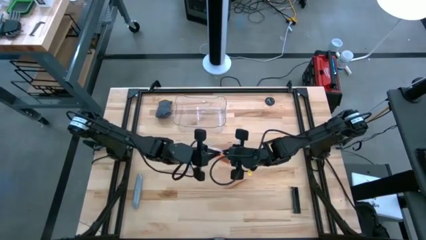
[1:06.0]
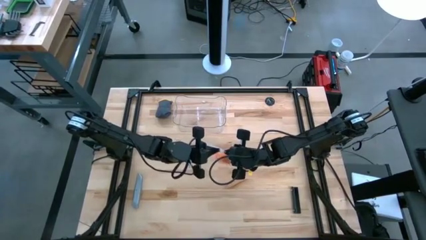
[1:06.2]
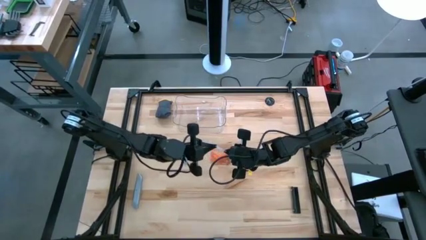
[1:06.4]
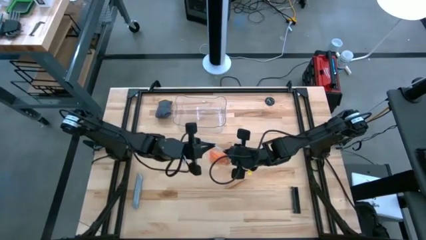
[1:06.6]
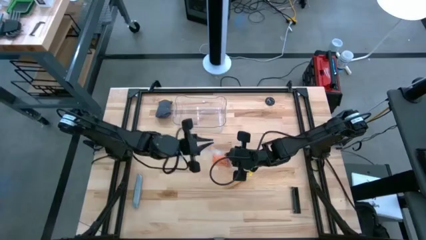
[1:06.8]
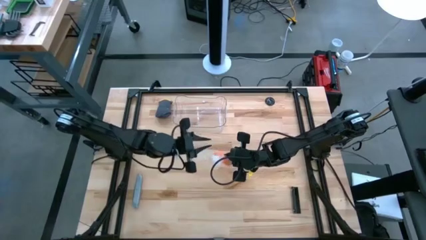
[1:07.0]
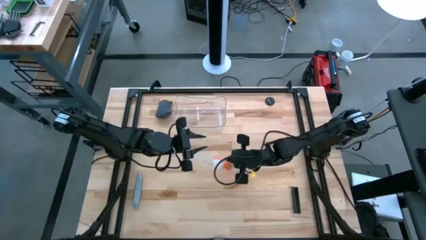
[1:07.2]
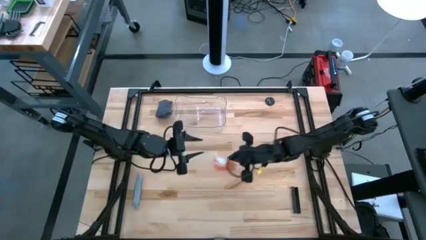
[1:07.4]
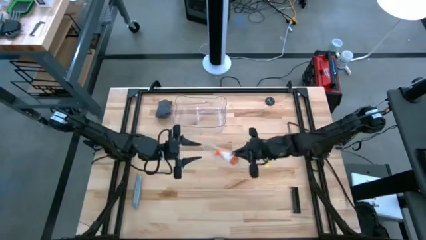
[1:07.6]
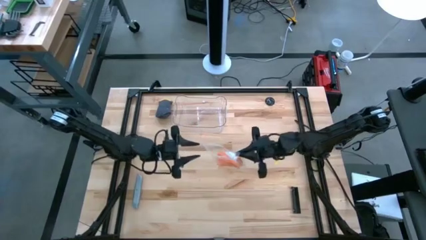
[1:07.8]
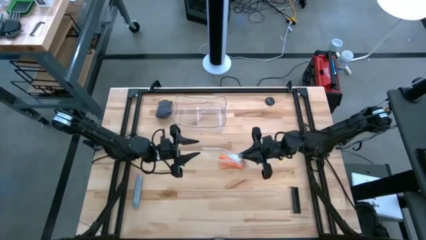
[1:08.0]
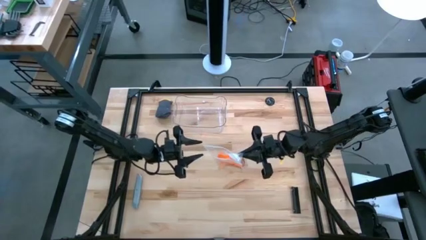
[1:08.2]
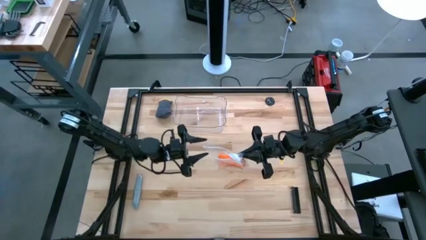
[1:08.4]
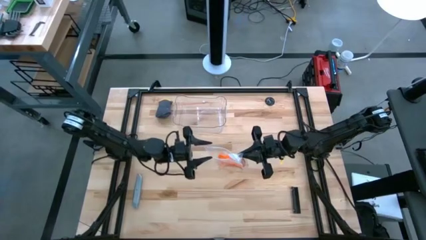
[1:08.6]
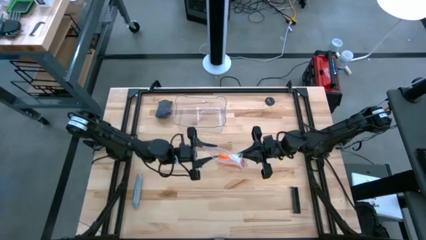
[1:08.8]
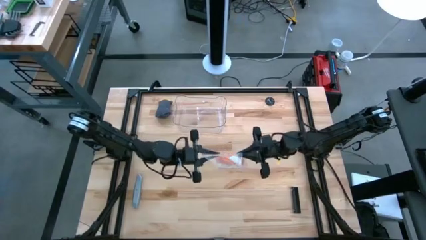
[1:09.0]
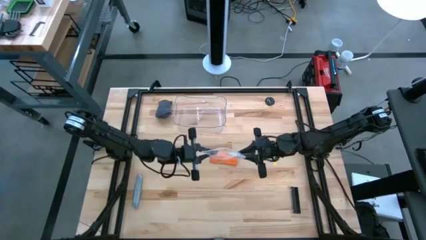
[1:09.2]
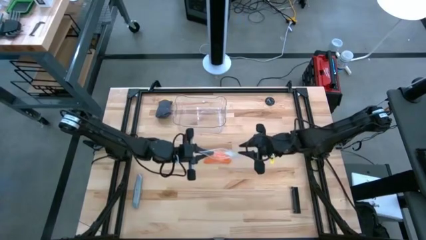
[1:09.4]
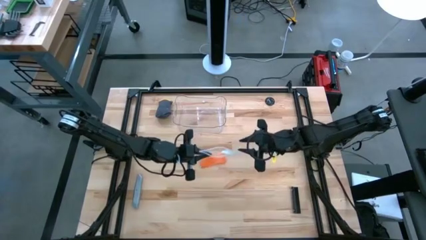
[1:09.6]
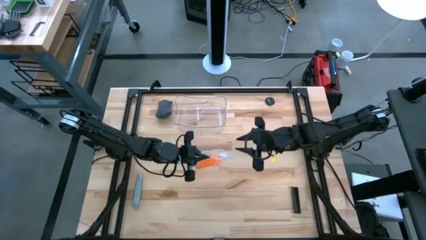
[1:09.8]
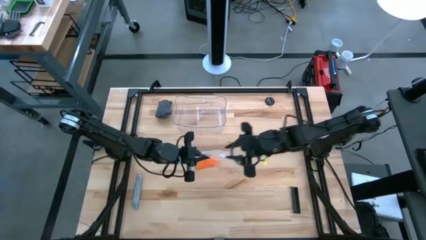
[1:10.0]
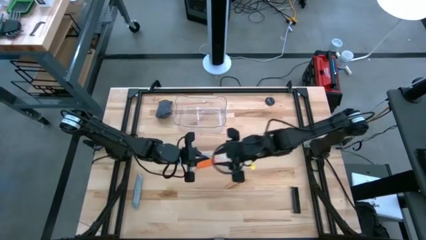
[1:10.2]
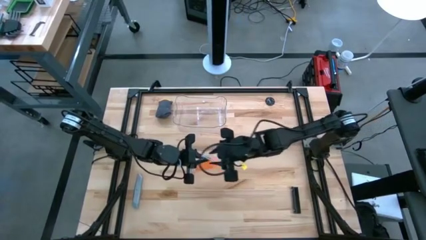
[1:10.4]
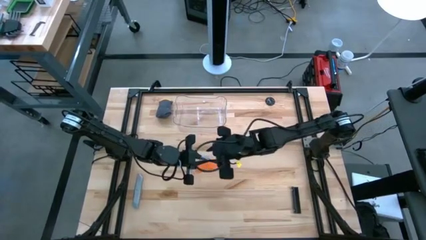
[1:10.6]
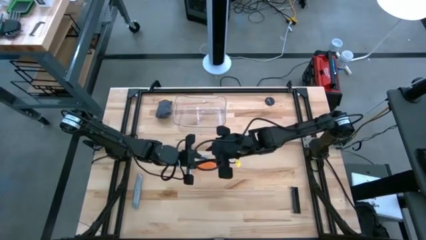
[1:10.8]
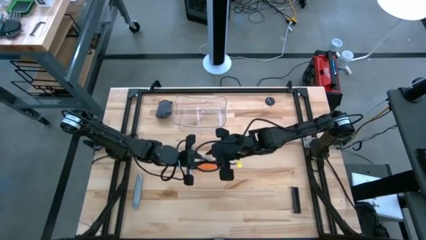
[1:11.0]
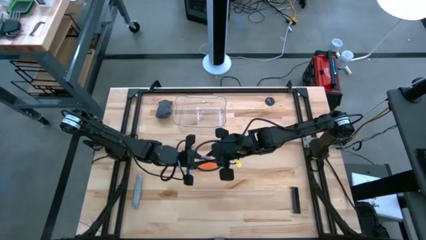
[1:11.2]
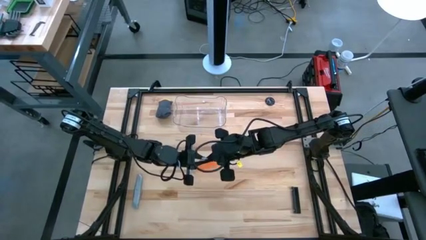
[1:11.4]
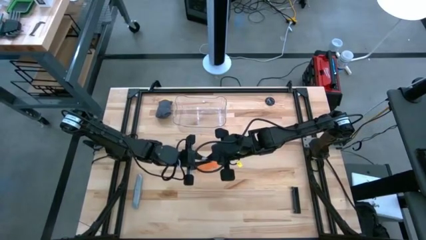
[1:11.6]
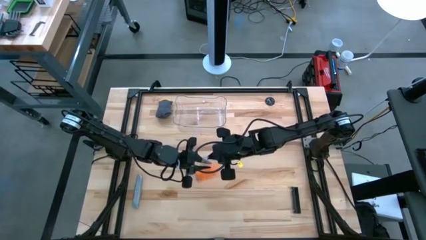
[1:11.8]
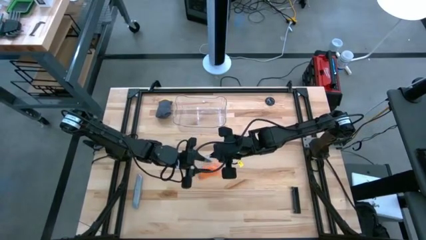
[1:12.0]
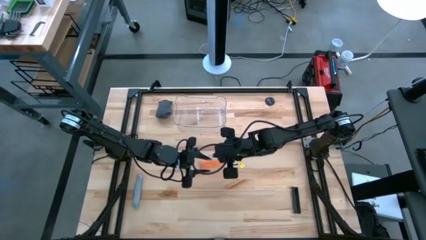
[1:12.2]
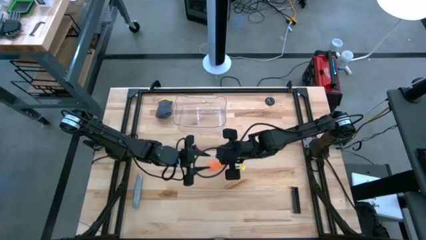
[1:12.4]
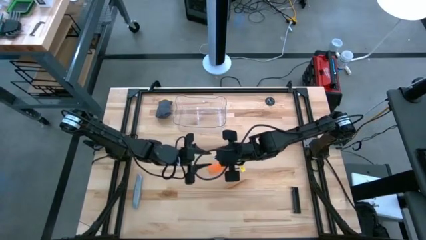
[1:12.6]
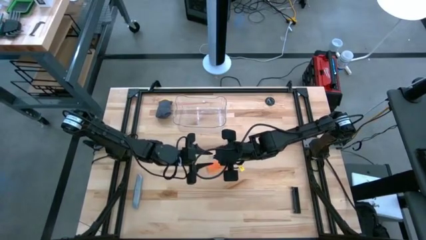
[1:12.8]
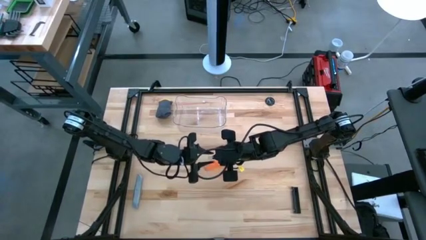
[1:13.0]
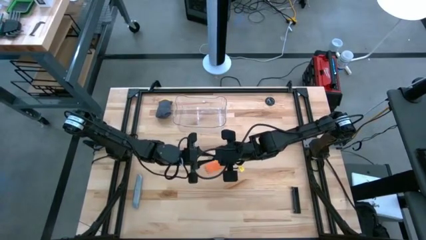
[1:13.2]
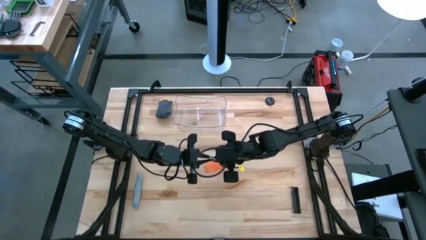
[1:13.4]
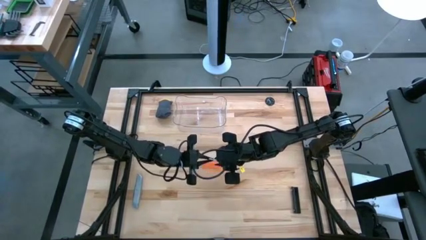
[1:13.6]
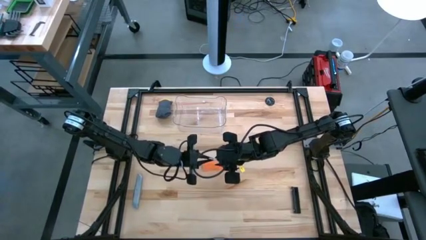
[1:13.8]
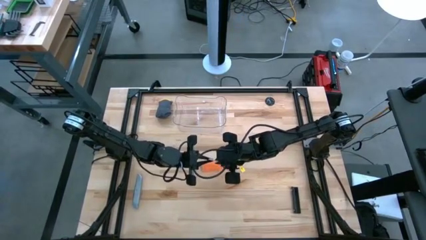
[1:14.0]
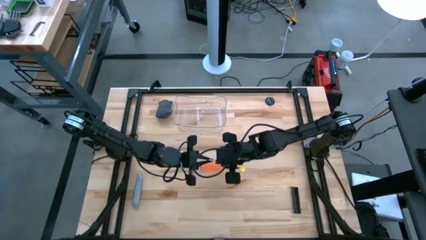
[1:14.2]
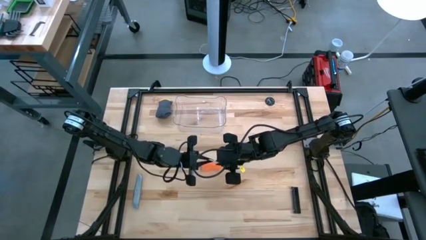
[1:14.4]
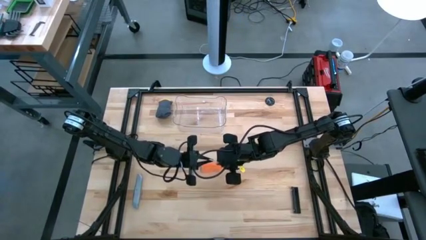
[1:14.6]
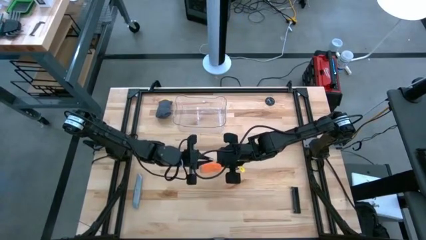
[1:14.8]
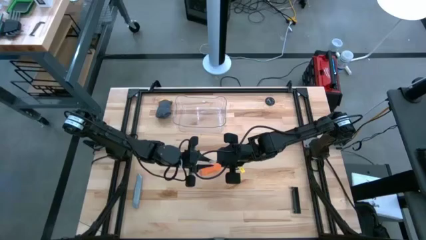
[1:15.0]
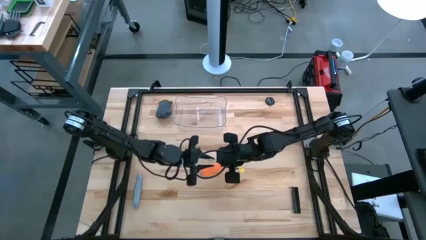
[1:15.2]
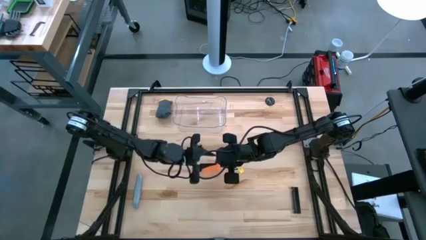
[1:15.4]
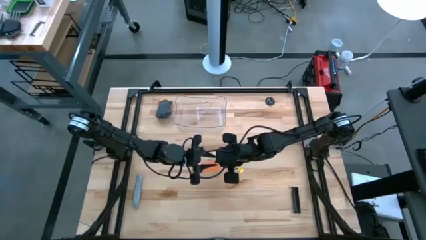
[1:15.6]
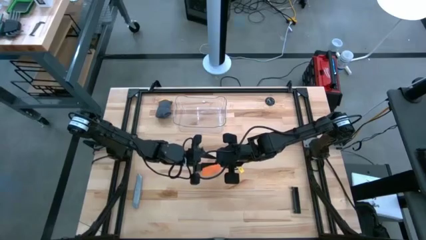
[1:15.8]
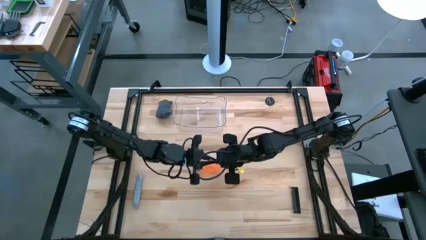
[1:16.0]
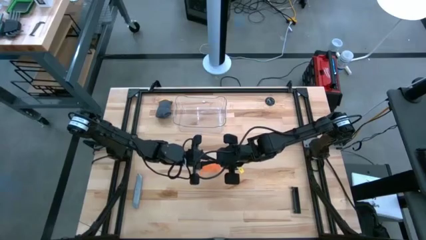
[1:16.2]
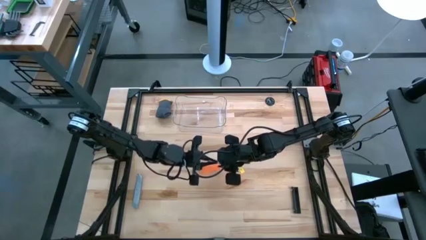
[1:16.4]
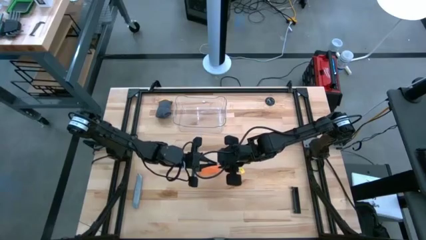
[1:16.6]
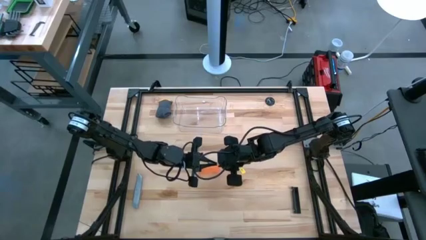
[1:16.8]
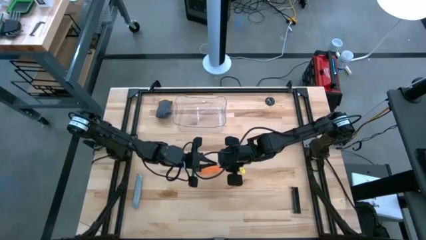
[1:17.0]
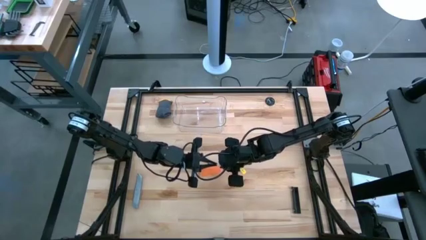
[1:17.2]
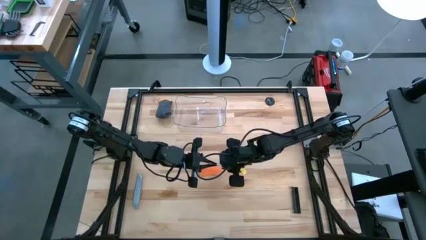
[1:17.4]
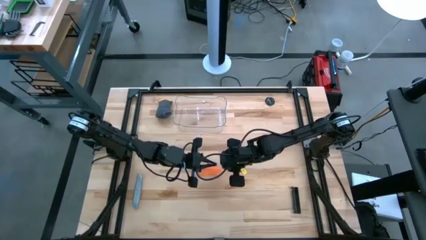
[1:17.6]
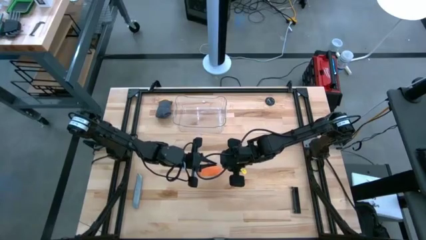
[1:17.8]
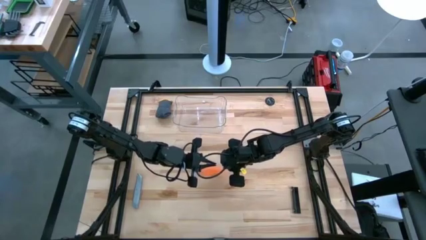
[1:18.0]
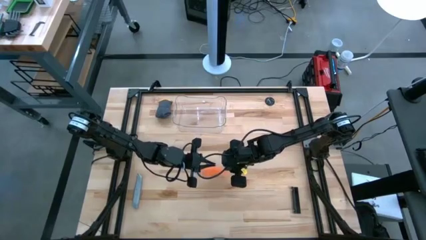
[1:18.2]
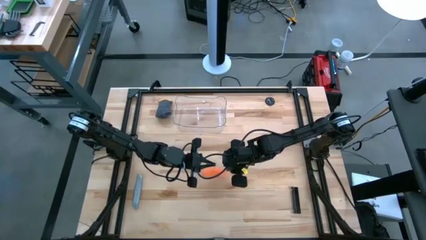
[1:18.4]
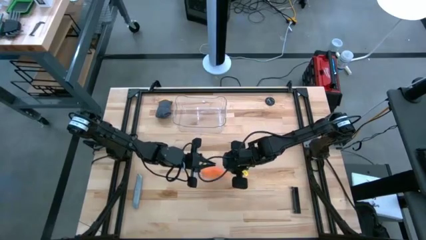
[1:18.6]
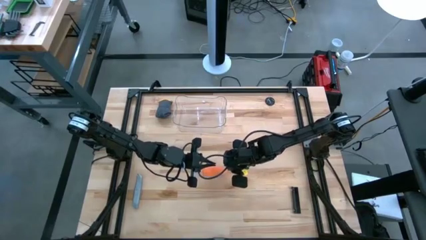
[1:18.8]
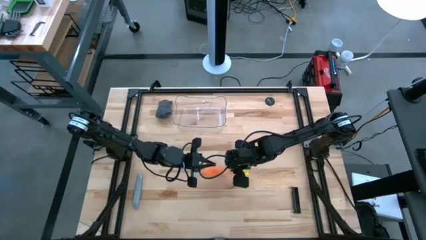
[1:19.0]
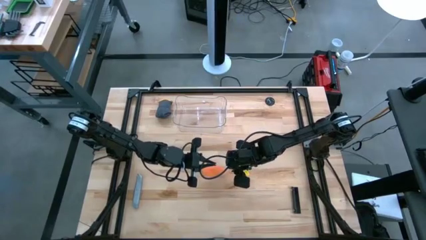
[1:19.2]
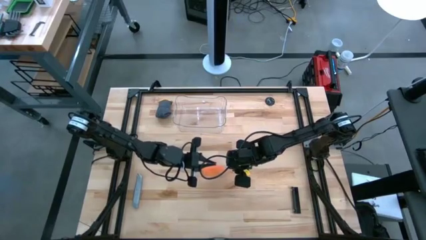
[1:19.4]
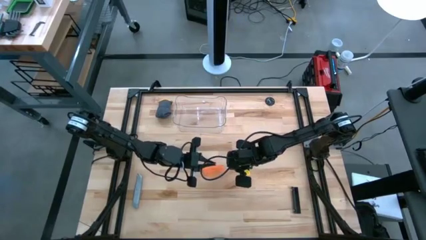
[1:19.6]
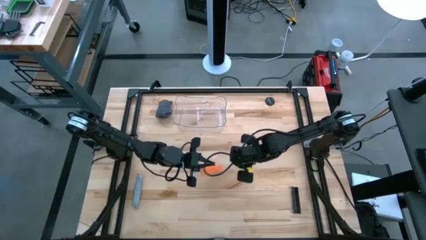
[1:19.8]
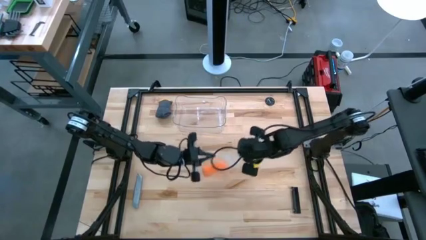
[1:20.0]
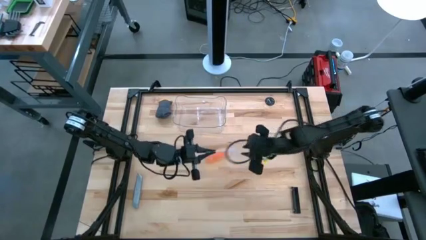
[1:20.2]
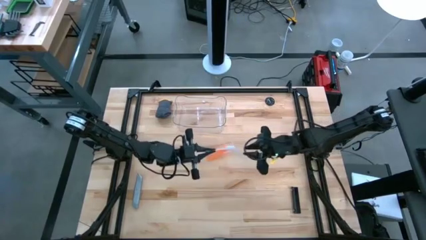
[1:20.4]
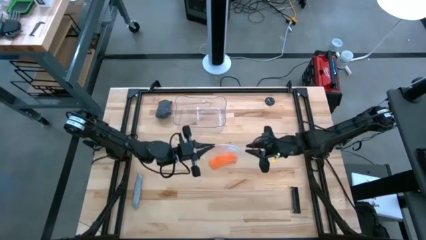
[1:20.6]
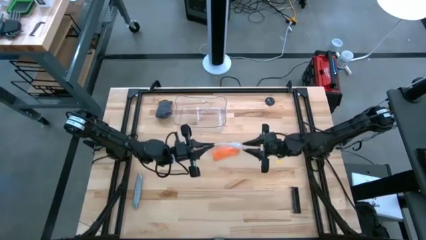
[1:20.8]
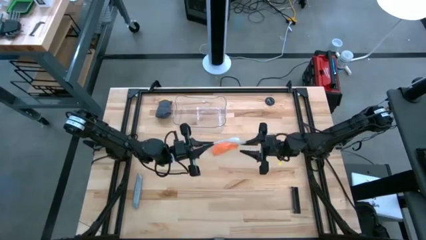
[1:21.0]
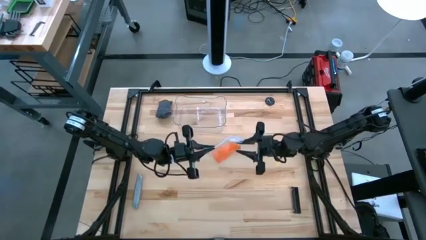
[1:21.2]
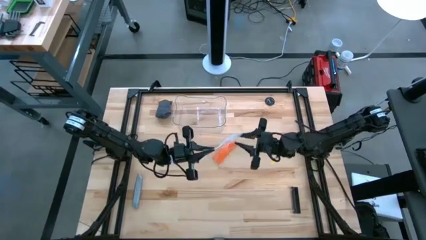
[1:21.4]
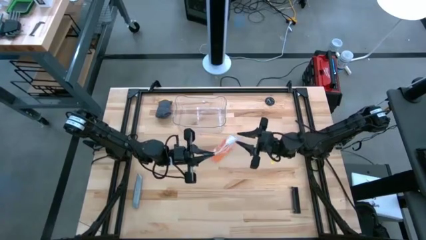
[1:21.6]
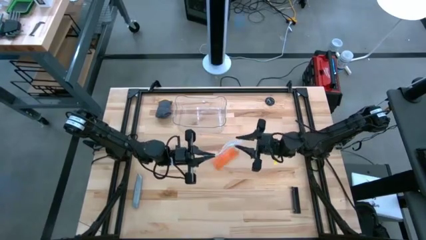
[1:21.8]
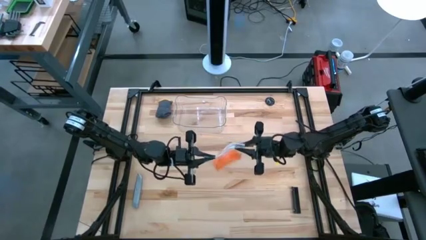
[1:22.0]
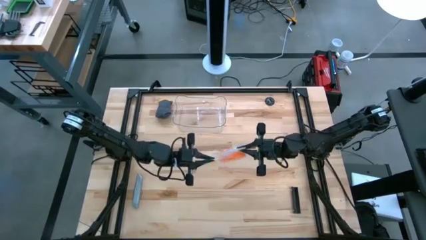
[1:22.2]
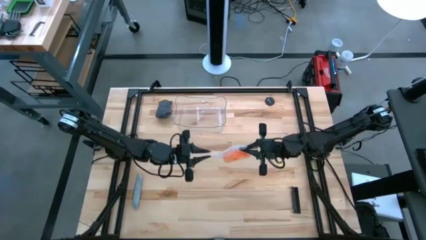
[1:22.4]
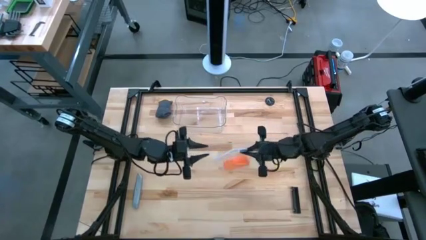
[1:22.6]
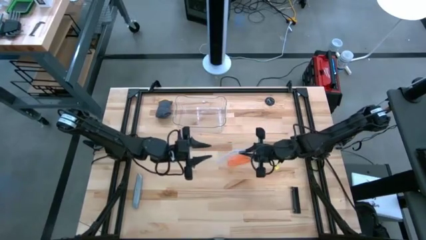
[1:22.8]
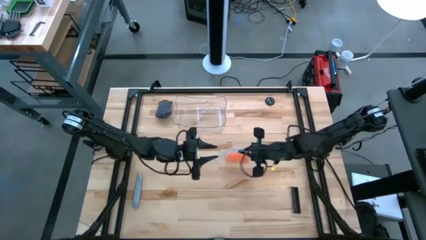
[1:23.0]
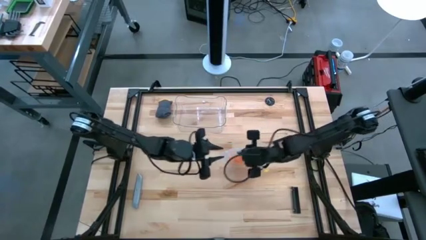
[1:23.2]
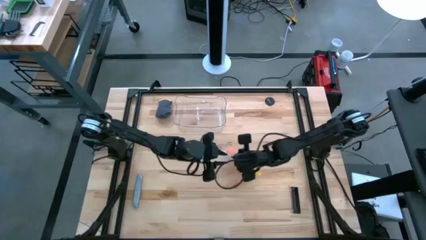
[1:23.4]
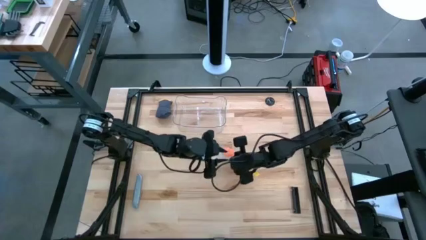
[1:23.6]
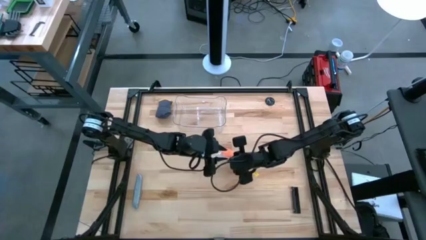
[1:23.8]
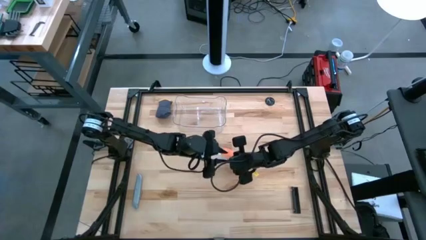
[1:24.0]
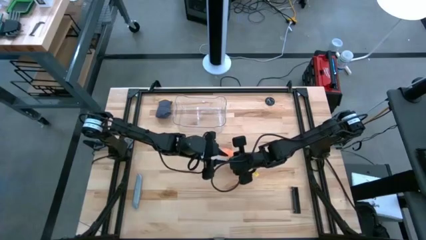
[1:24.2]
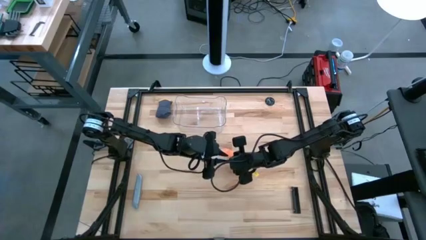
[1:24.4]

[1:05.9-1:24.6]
Task: Roll bandage
Put the zip bag into the transparent bin
